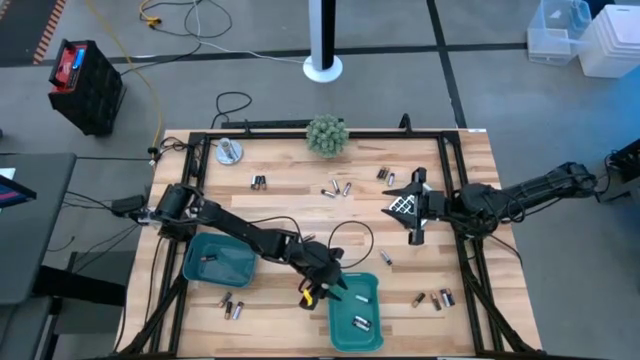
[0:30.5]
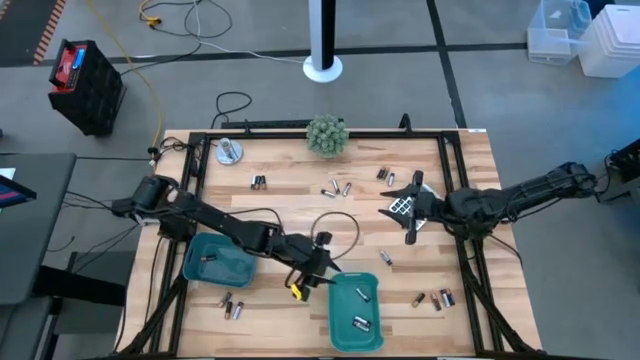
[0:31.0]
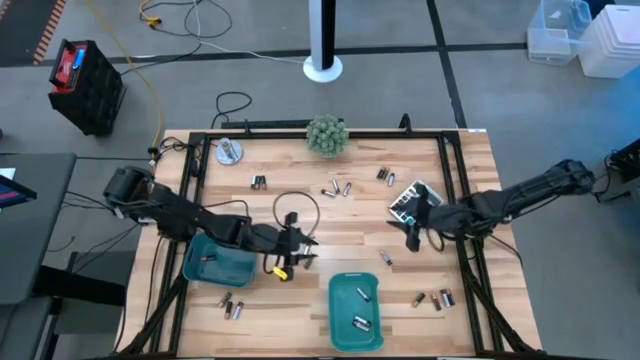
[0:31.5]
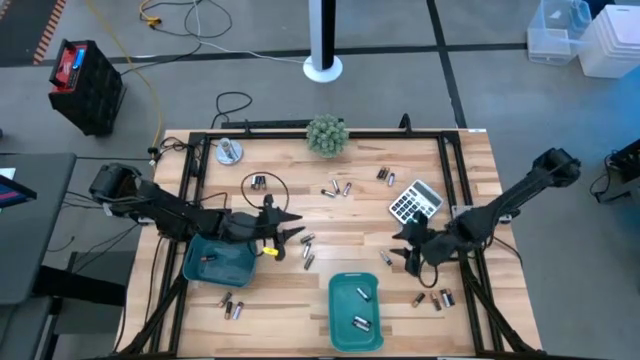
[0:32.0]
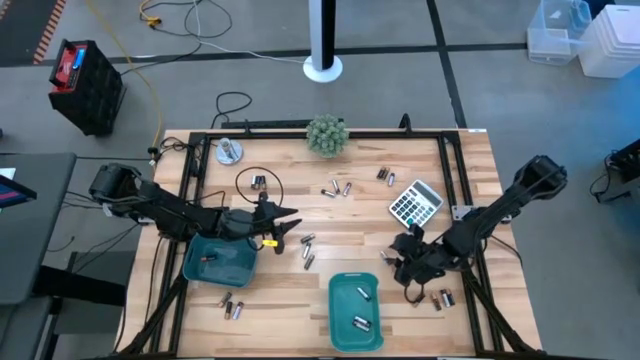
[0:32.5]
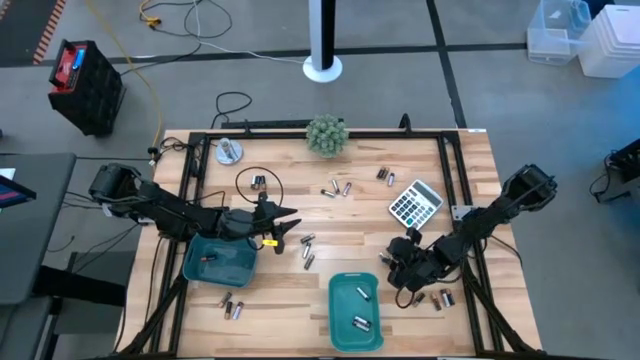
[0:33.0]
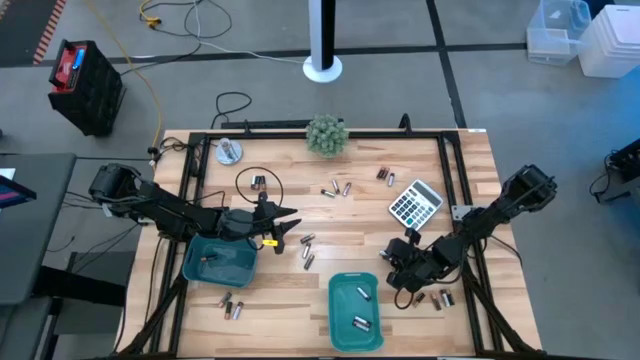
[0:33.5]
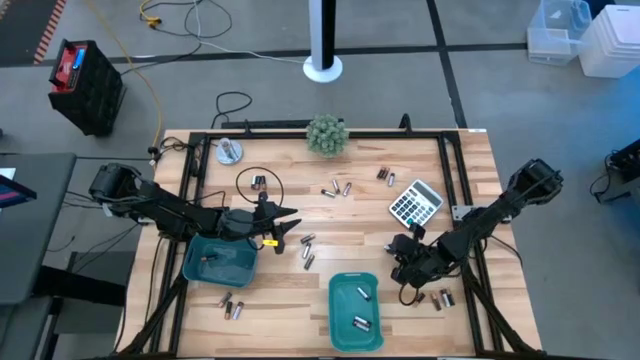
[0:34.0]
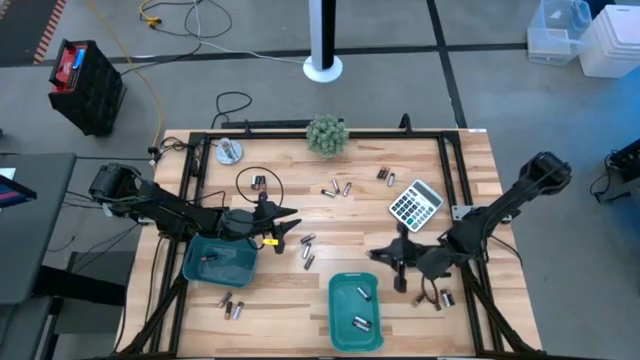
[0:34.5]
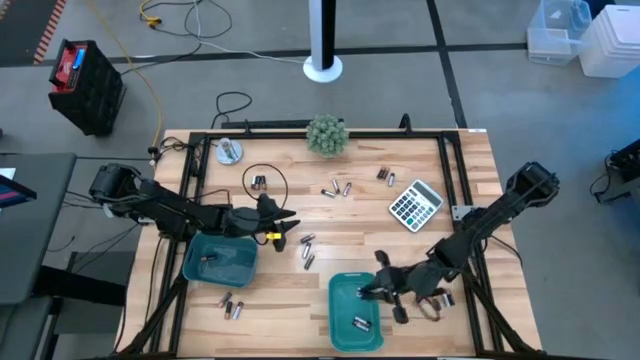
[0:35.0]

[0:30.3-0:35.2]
Task: Sort batteries
Put the silver battery into the green bin

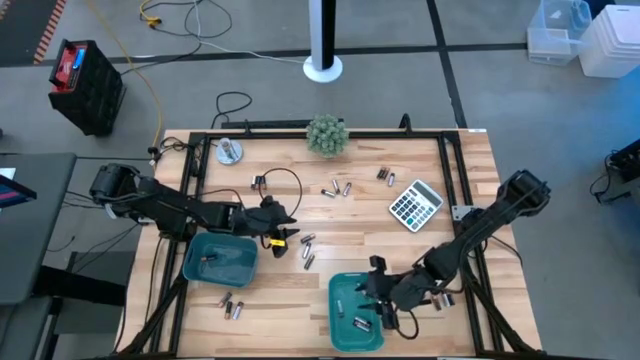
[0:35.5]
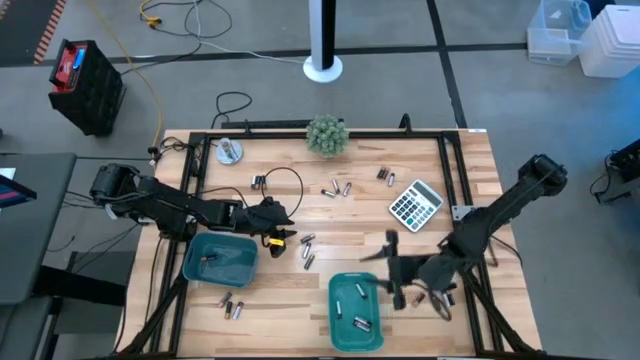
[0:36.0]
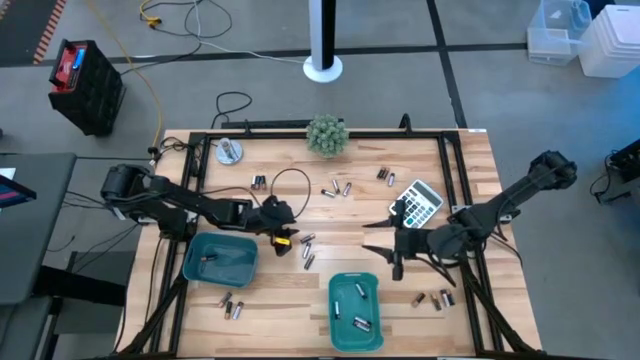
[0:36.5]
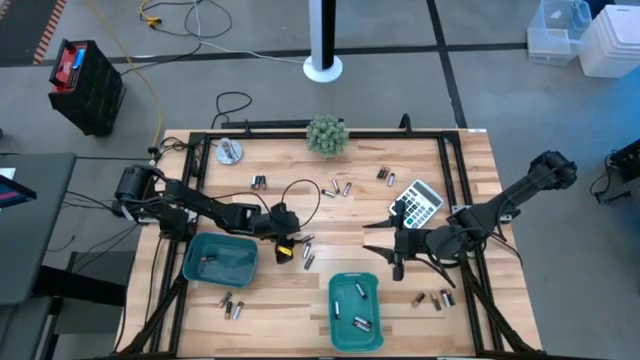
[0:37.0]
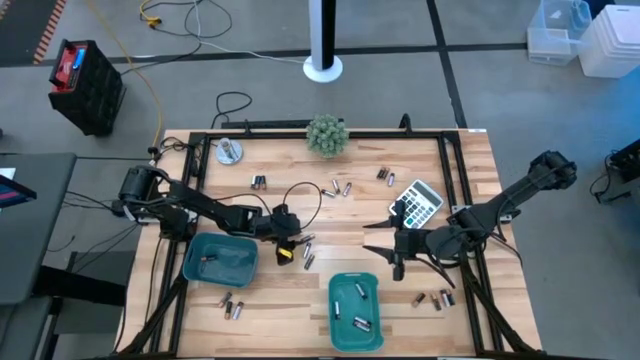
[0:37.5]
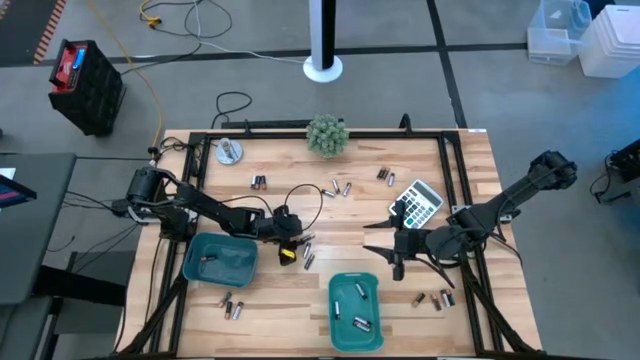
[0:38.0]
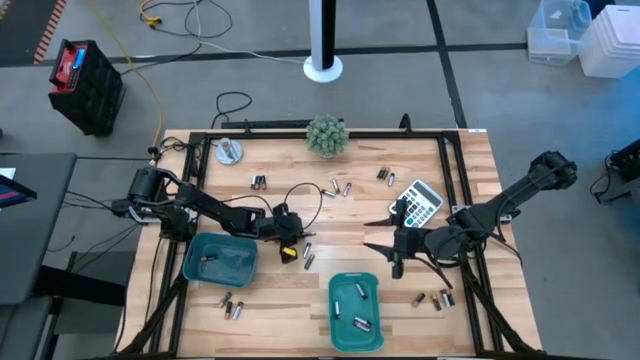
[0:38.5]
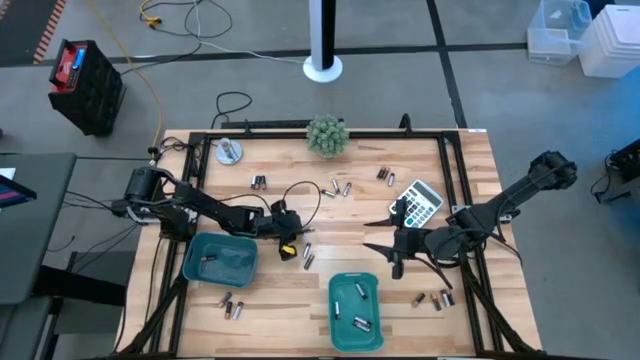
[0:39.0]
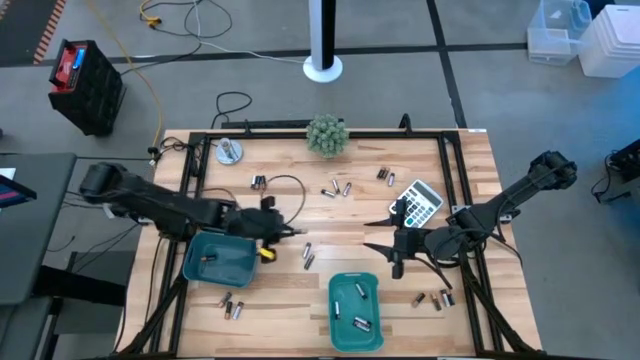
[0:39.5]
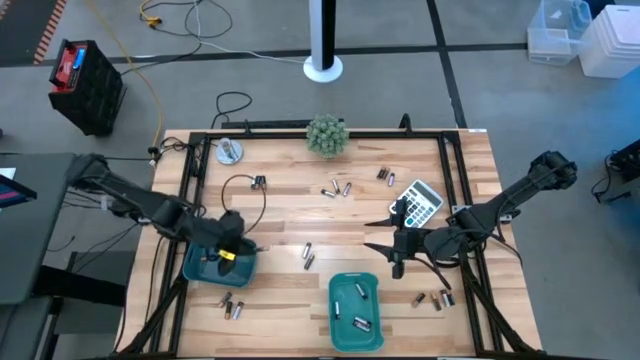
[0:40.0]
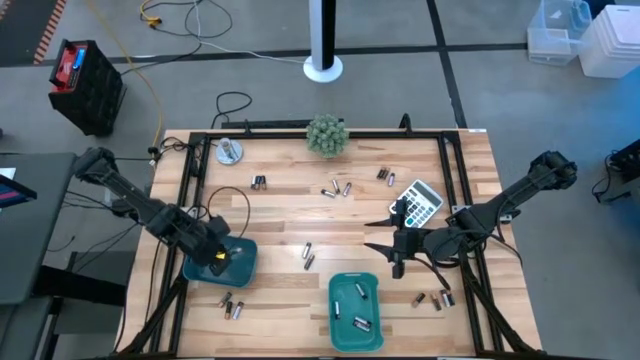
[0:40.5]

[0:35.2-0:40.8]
Put the black battery into the blue bin

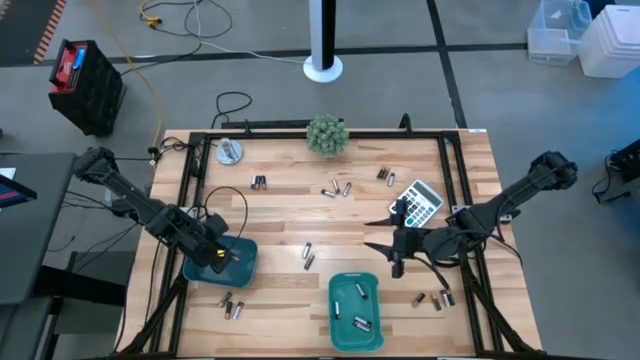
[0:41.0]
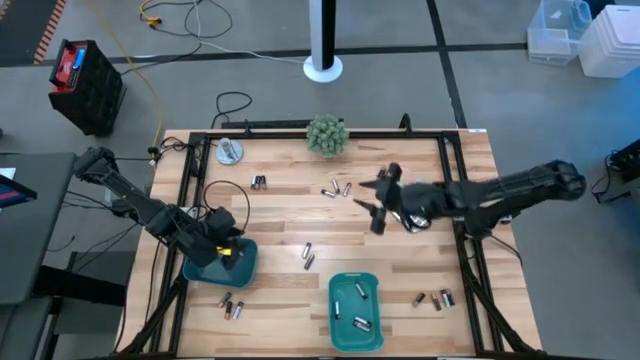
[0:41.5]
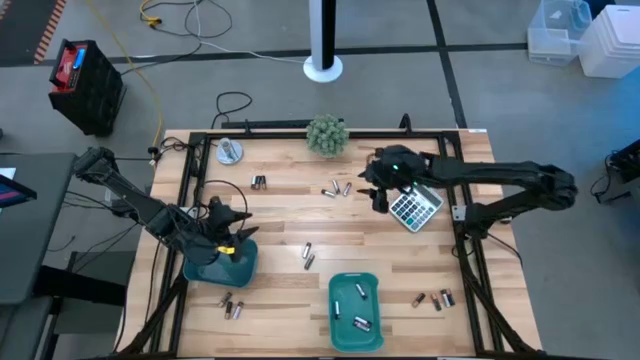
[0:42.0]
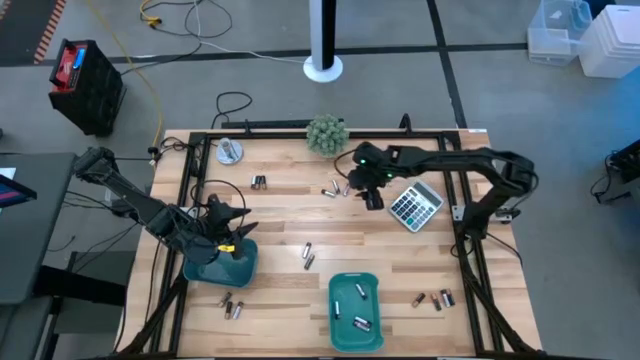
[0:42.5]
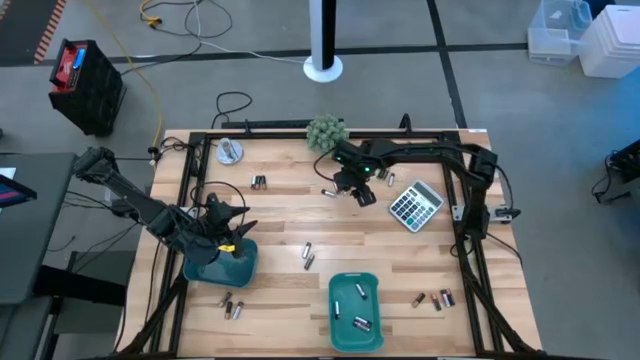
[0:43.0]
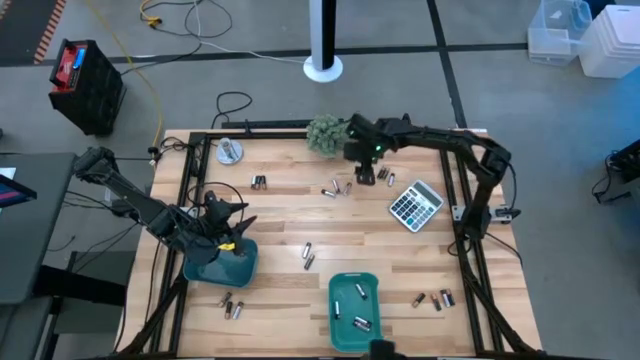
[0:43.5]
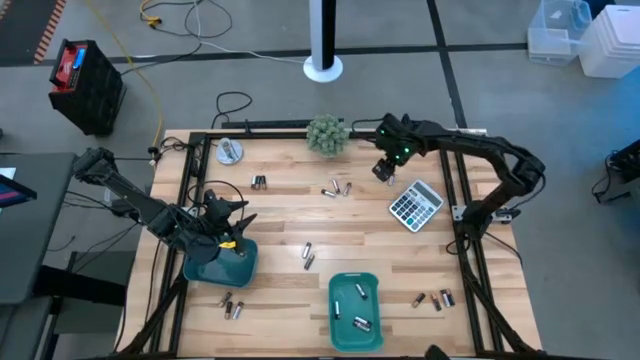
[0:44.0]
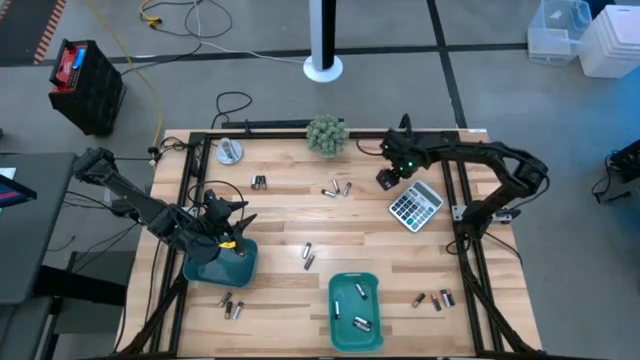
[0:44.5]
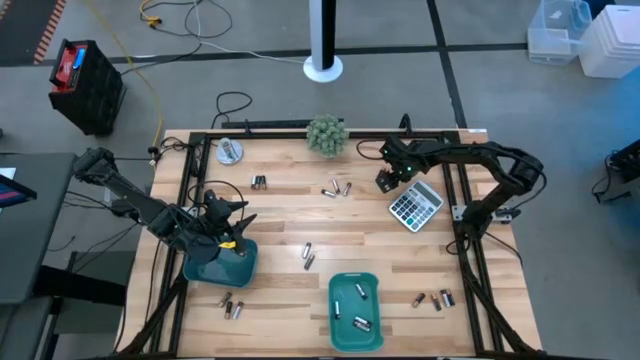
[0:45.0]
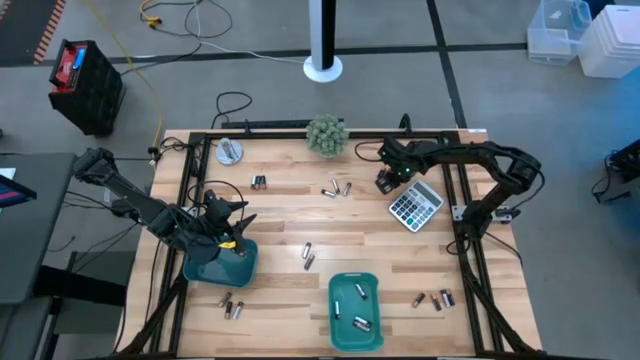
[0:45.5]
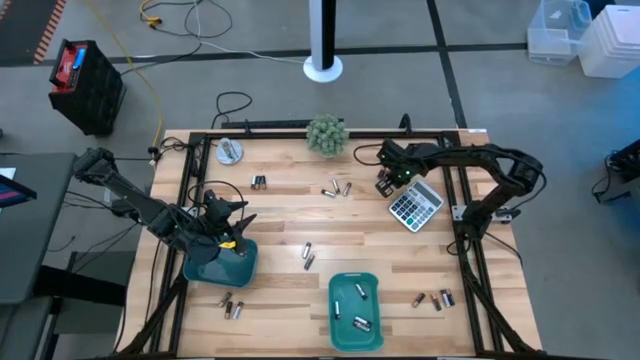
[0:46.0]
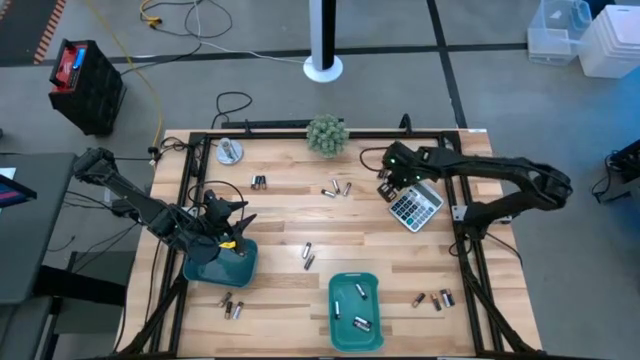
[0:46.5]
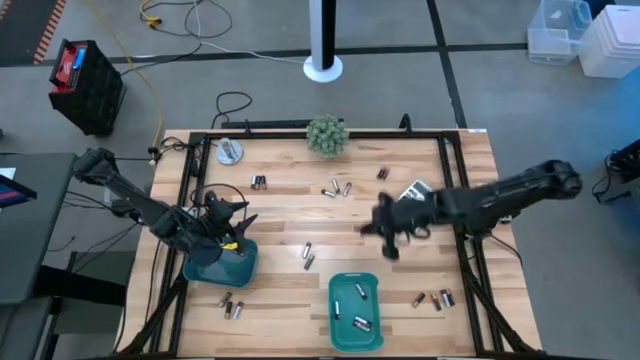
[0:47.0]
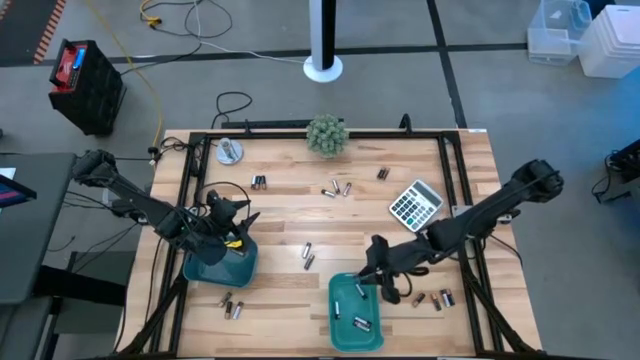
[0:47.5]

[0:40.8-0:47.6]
Put the silver battery into the green bin

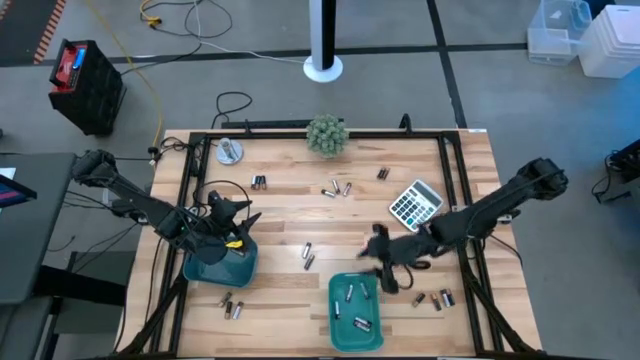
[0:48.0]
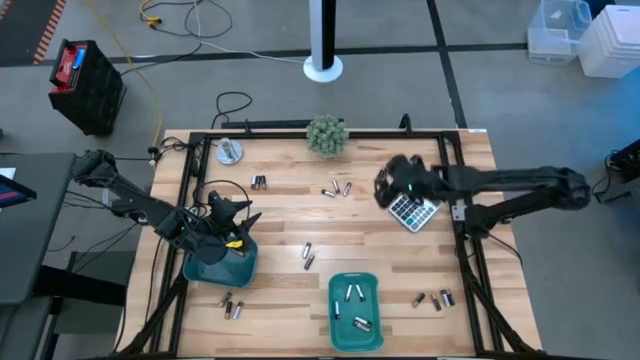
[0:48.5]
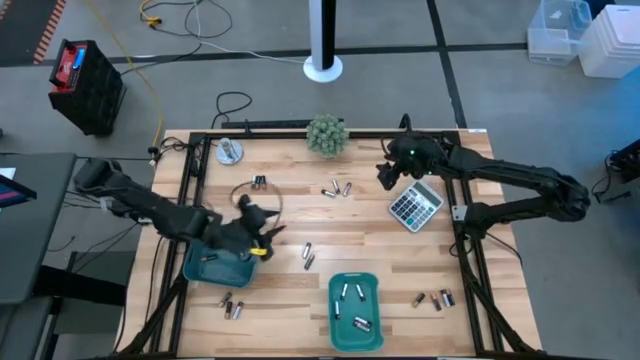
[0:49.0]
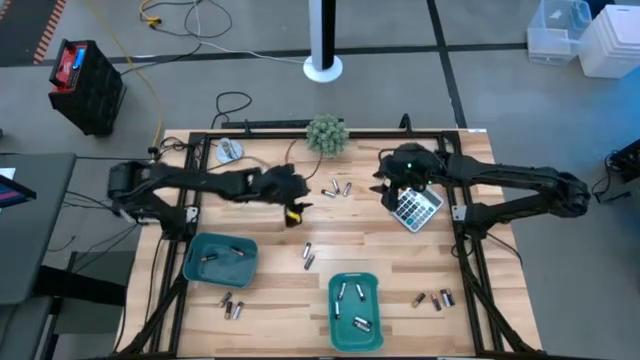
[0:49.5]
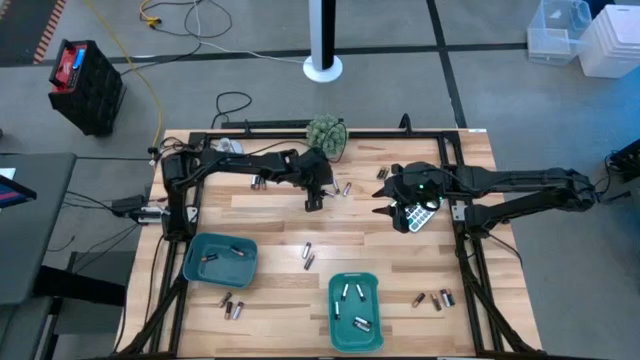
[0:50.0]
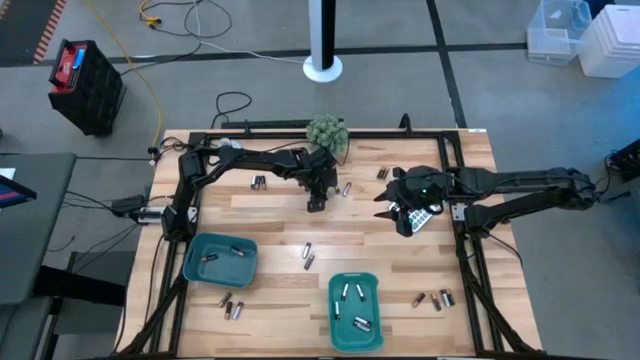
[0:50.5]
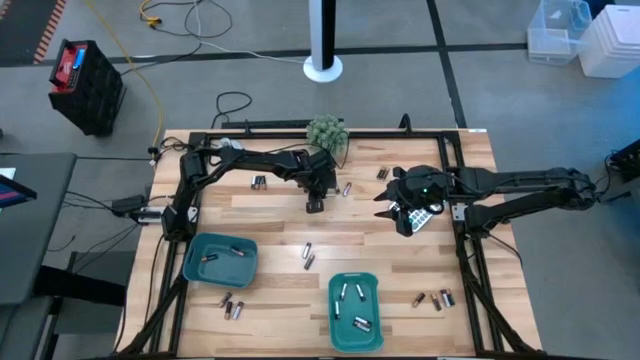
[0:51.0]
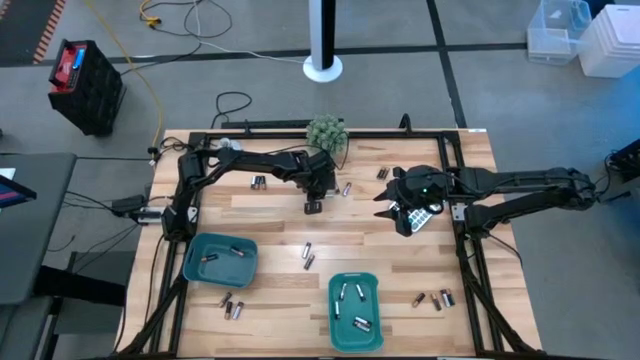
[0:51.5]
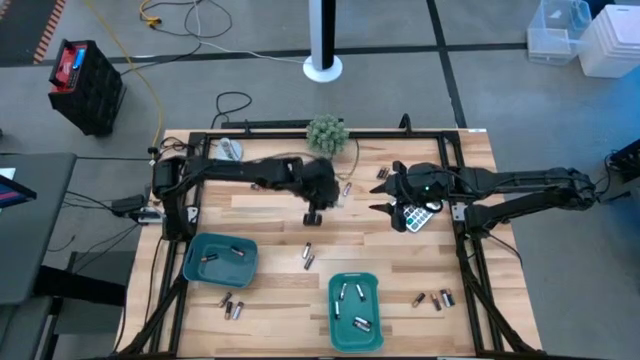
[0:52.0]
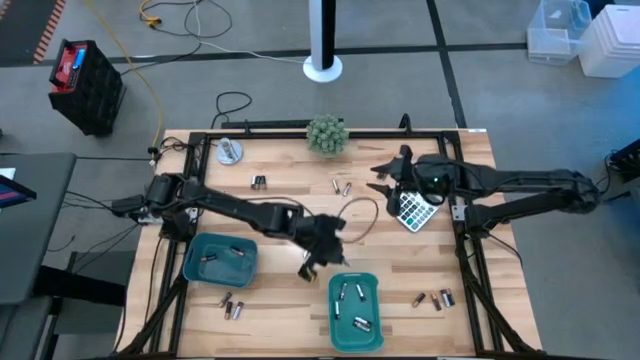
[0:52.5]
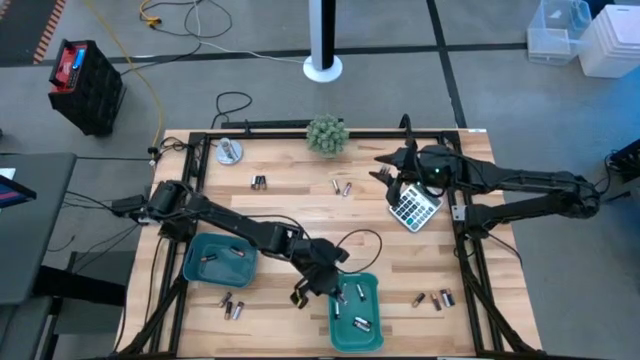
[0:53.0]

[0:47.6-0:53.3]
Put the silver battery into the green bin
